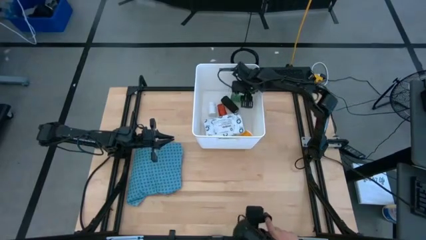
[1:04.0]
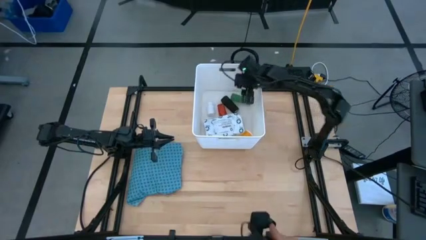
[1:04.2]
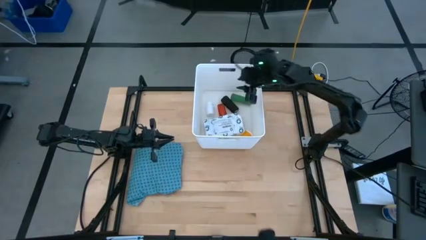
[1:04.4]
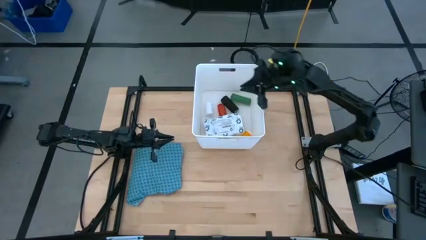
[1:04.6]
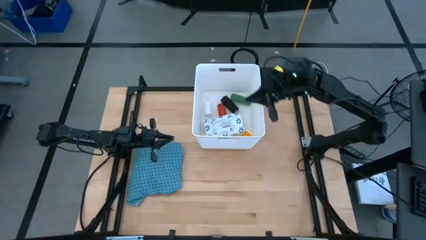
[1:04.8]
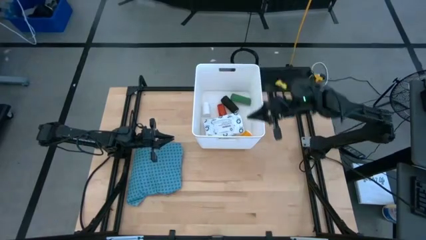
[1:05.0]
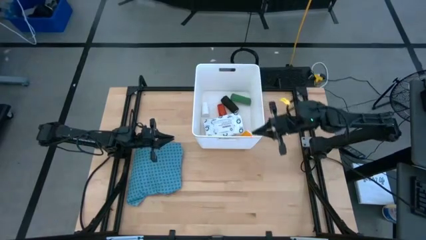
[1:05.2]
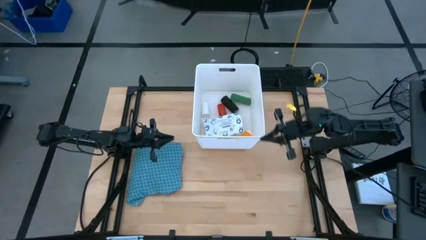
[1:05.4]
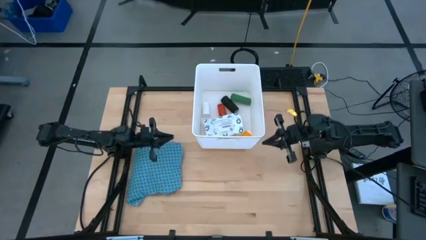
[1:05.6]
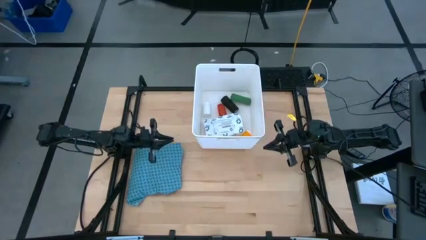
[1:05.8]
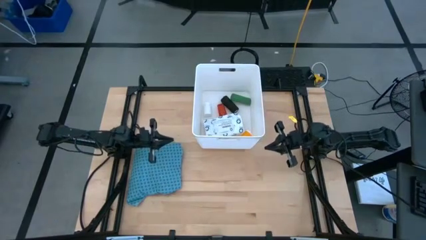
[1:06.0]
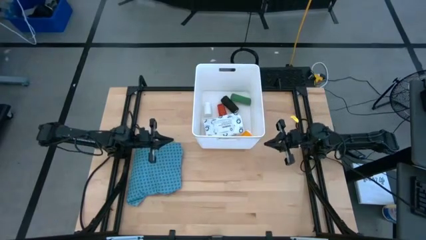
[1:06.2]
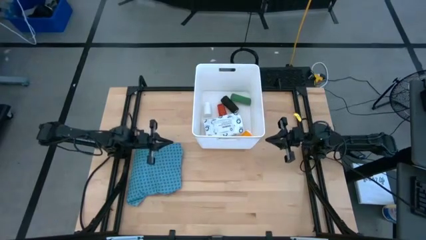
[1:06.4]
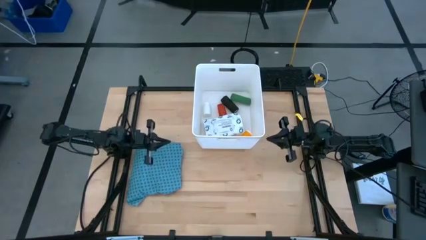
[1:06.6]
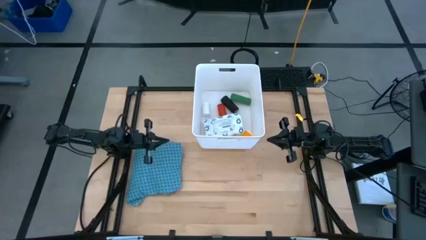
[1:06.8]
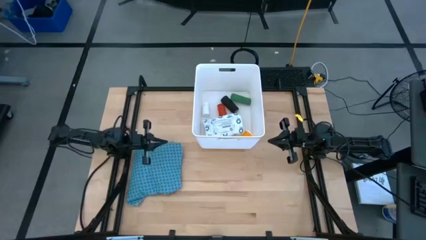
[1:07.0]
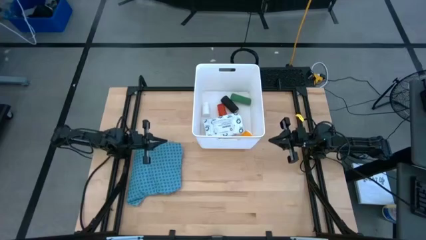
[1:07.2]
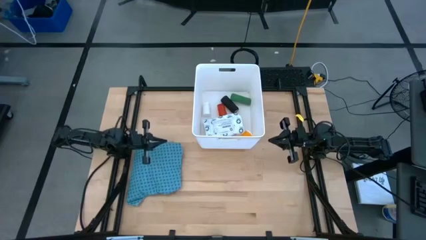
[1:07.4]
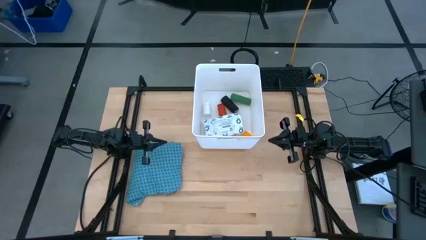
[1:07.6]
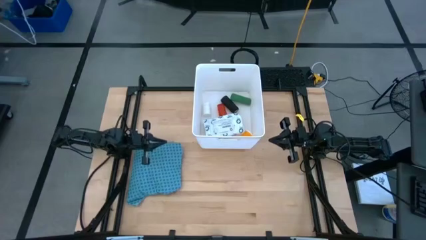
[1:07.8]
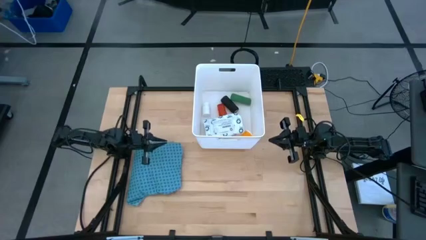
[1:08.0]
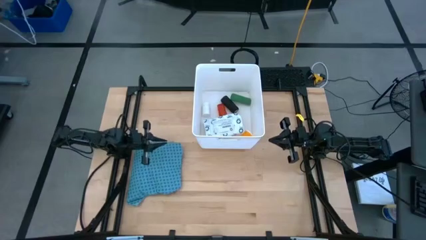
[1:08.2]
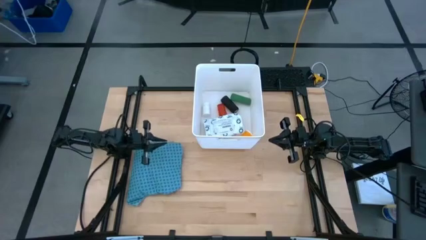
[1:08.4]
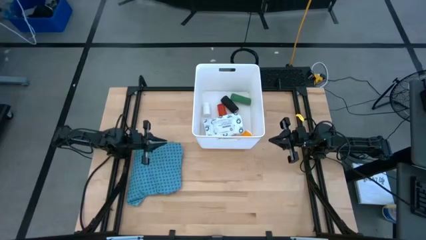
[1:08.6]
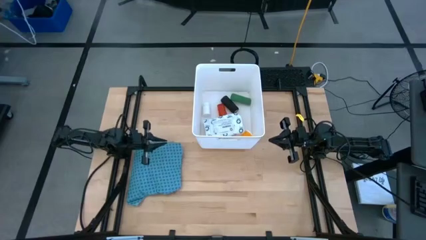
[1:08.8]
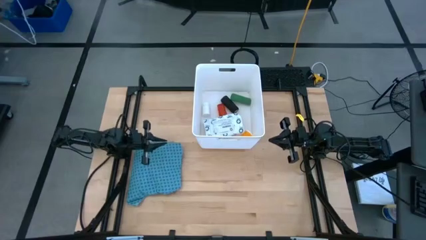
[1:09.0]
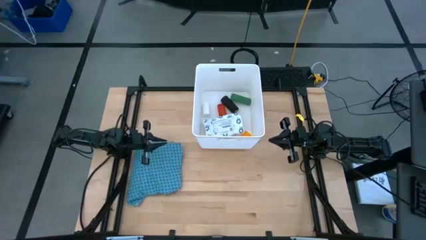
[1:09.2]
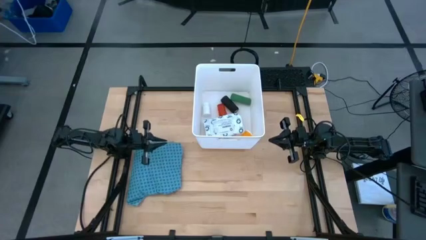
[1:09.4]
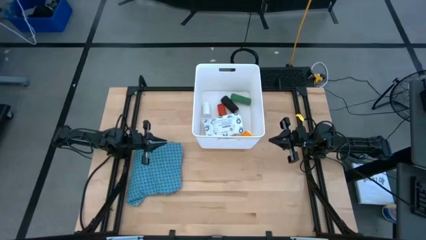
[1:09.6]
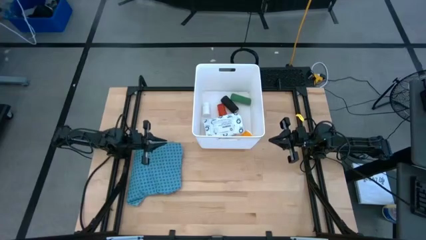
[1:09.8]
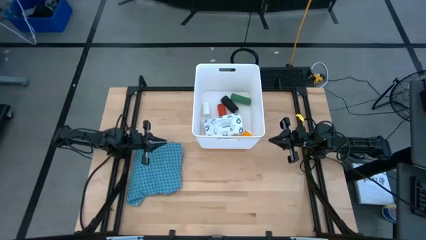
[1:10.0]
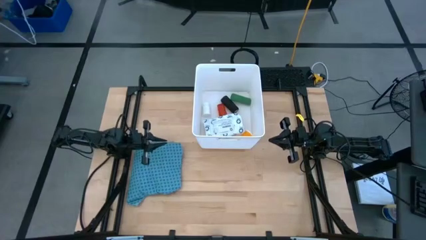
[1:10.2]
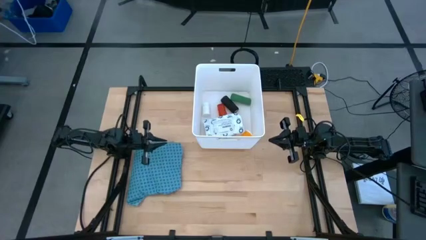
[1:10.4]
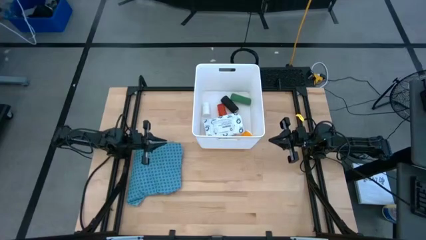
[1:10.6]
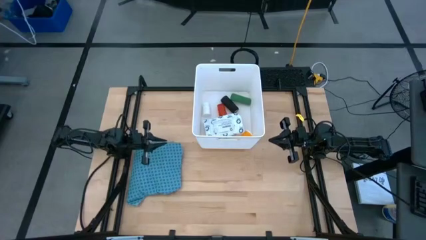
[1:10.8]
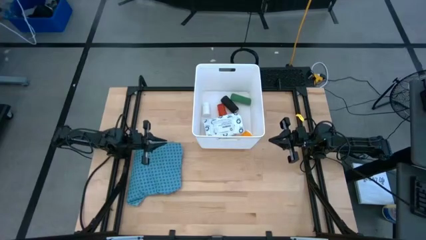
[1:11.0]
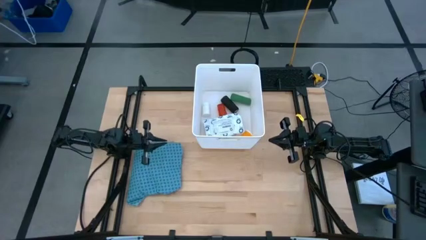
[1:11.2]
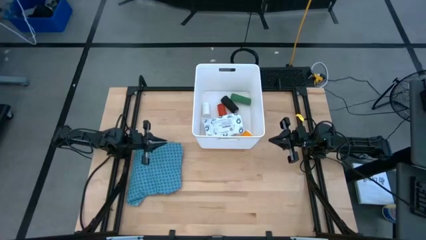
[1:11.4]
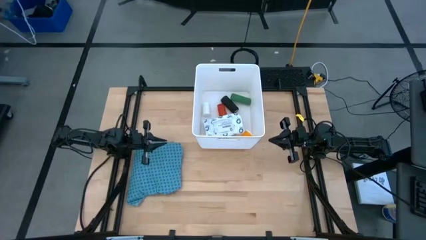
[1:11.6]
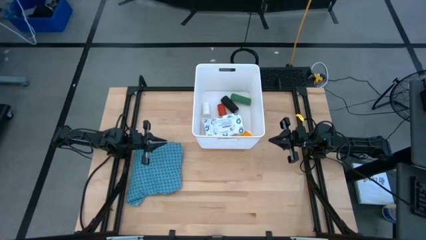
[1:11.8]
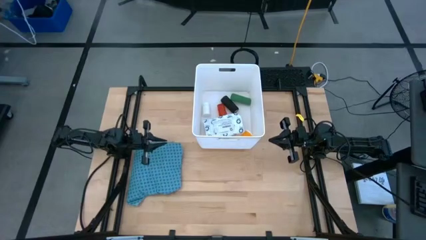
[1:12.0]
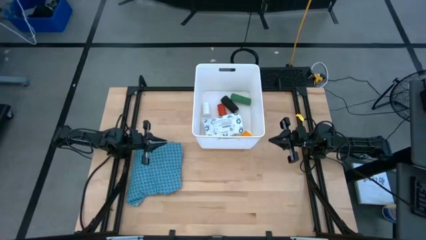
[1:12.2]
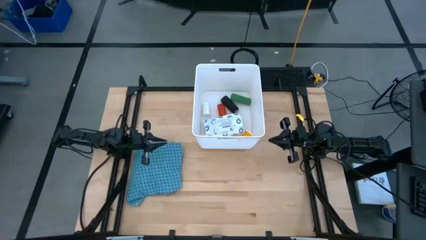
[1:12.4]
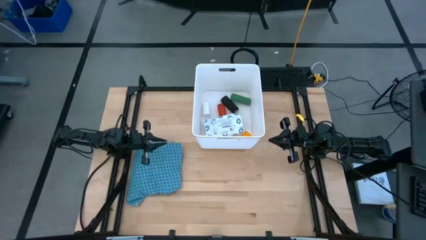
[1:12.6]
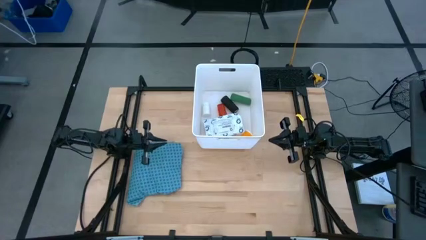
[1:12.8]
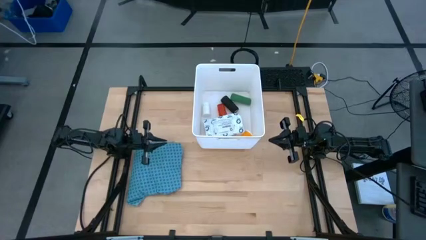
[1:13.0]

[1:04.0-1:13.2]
Task: Pick & place medical supplies in basket/bin
Return to Home Position

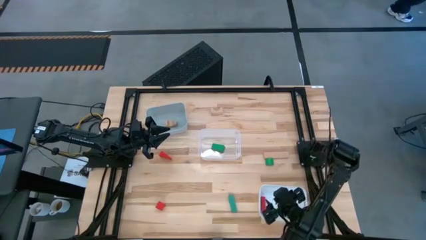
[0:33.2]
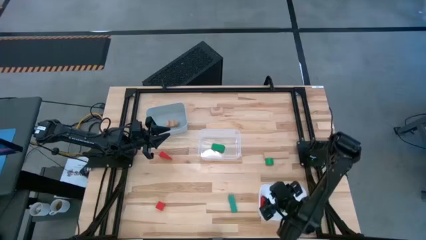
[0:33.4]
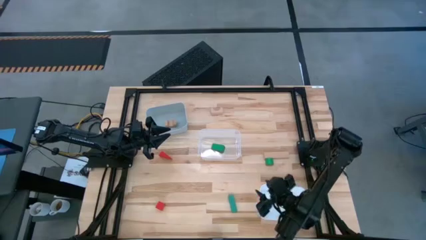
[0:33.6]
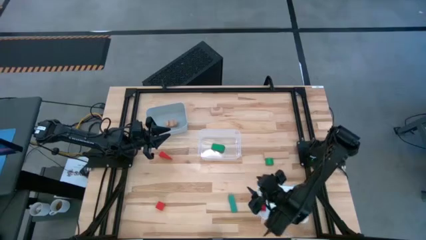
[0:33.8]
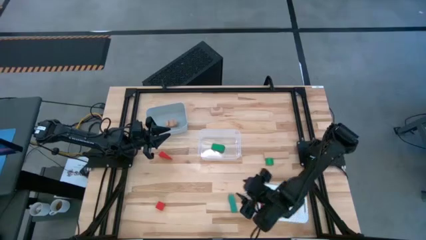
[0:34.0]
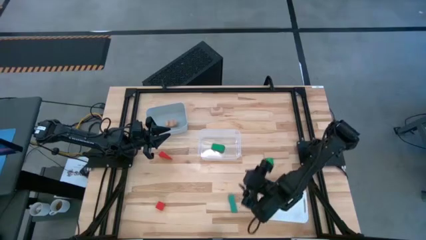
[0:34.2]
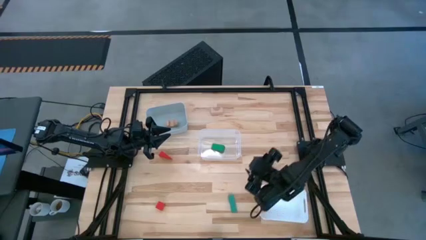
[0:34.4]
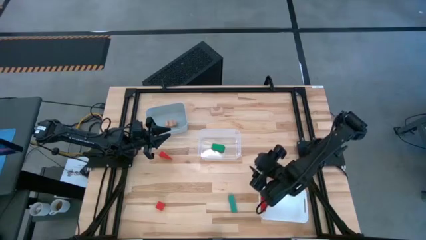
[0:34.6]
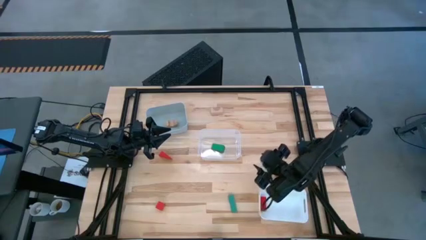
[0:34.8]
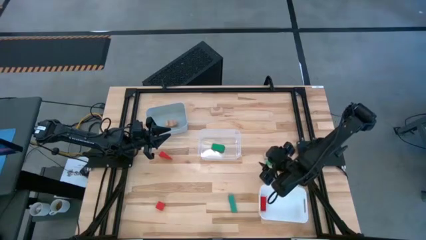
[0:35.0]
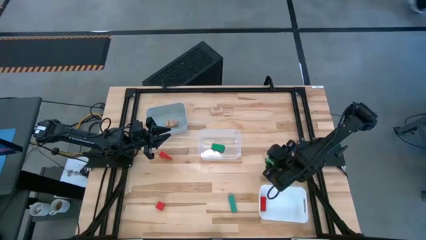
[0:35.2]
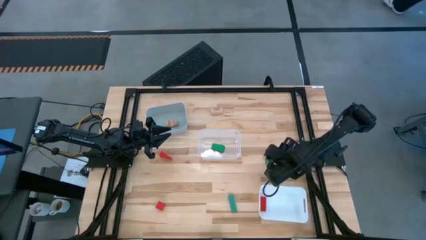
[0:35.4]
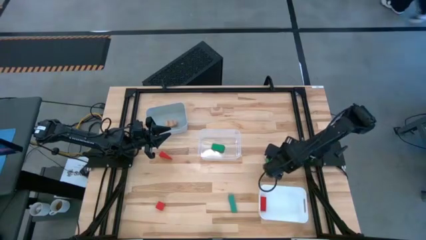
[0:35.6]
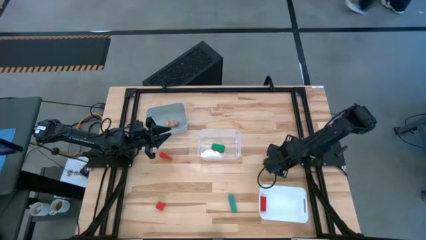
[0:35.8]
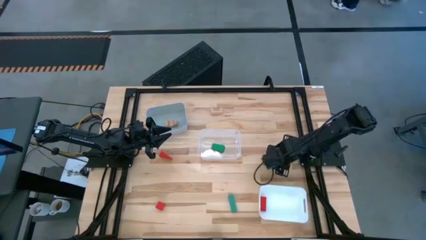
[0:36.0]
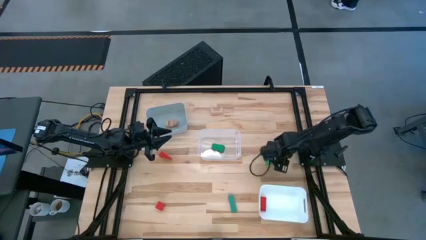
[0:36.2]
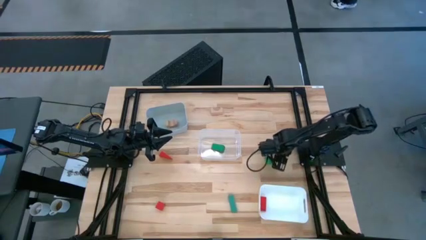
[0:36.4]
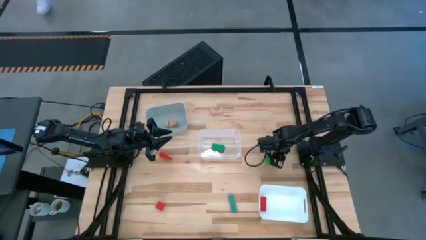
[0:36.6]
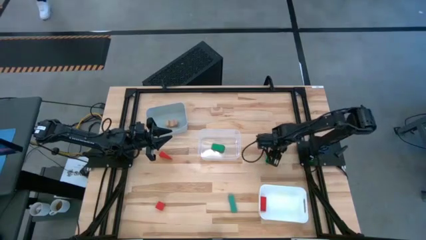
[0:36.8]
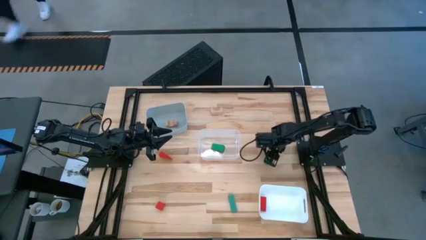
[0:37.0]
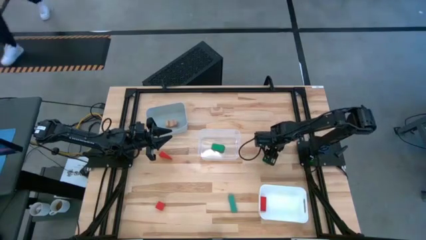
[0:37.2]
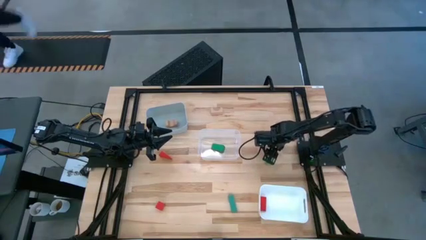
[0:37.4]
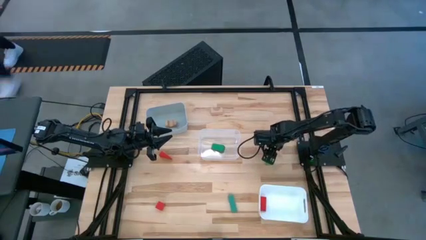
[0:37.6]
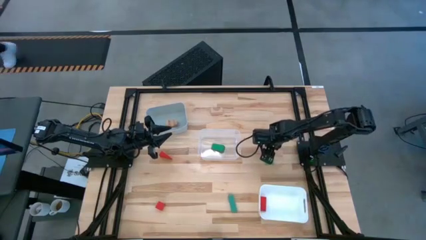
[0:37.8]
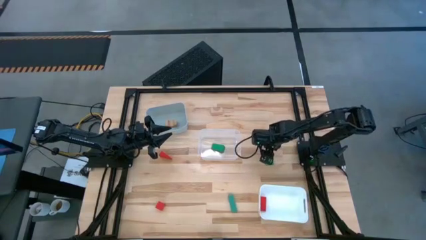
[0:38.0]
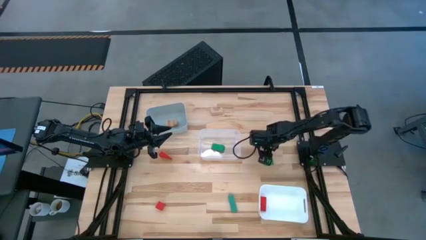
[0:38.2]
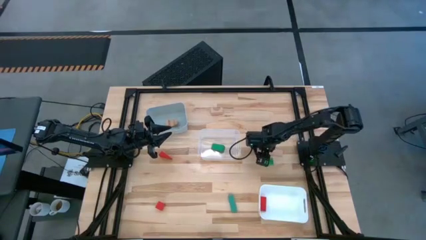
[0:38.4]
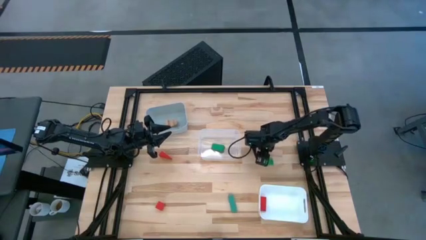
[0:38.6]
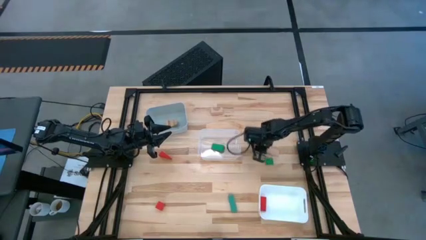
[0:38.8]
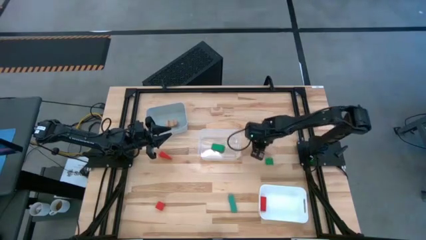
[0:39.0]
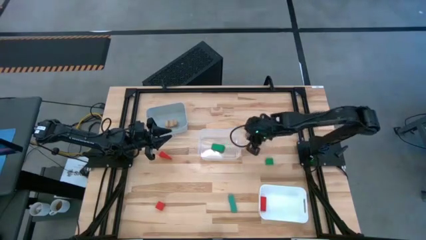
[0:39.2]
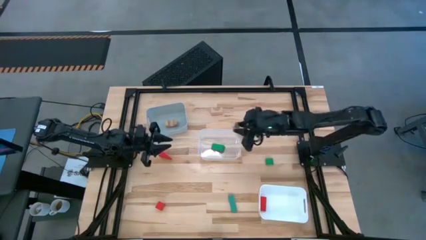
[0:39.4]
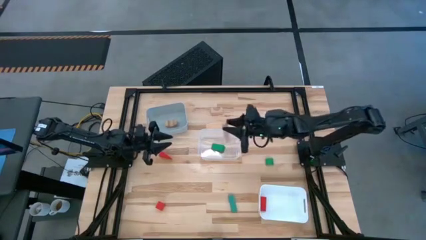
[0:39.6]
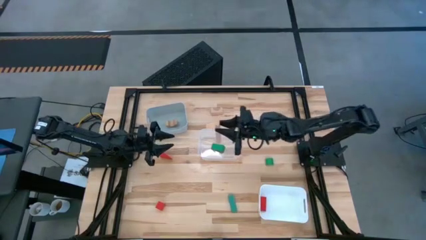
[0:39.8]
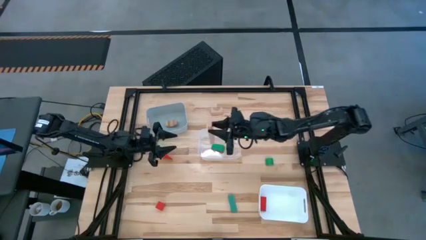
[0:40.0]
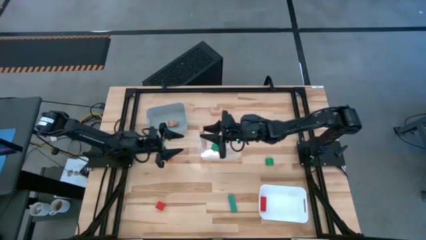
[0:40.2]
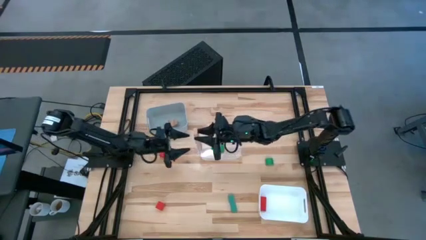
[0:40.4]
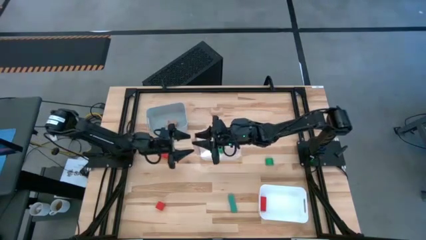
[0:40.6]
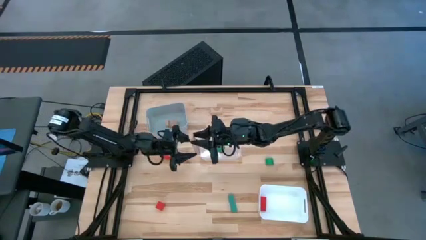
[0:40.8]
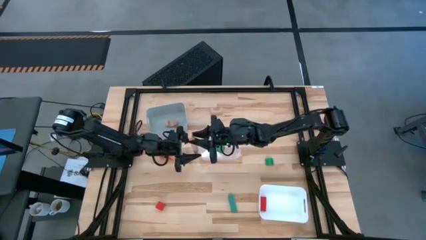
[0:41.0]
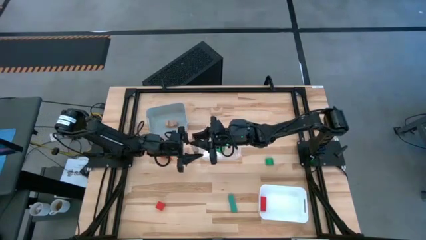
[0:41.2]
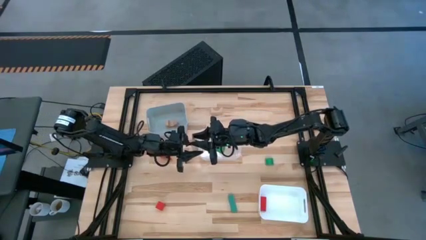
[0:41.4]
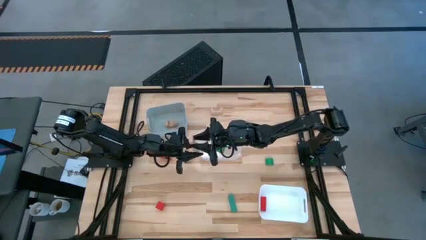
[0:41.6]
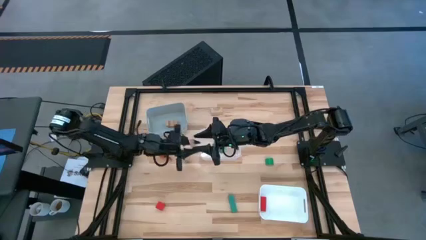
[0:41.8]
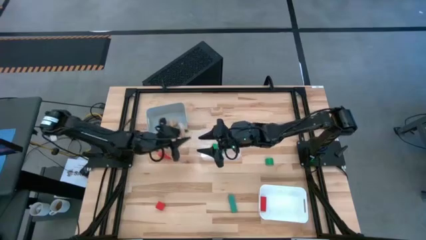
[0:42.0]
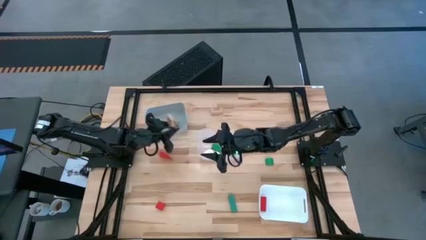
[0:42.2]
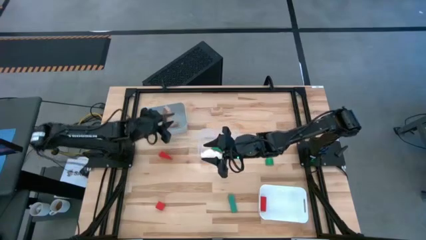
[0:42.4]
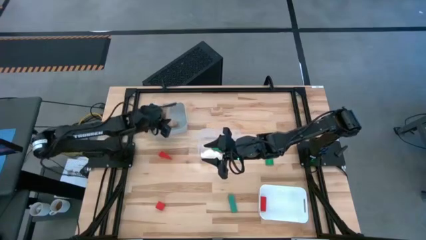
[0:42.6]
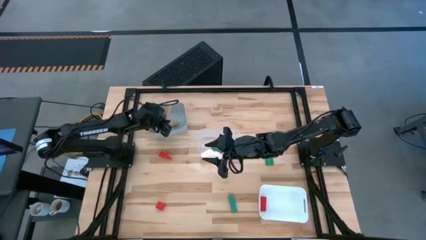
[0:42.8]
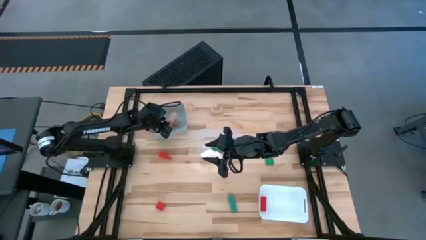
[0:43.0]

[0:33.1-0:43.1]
Task: Sort & place blocks by color
Put the bottom brown block into the gray bin
